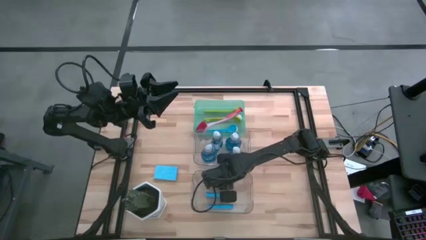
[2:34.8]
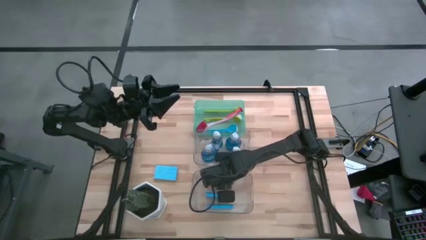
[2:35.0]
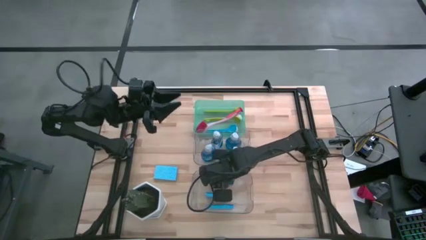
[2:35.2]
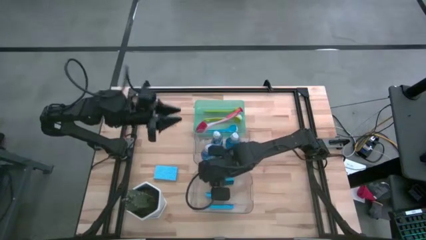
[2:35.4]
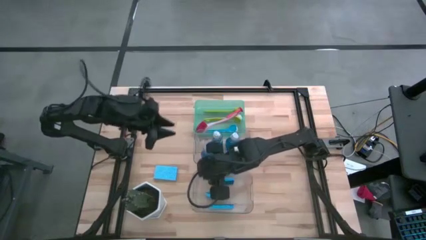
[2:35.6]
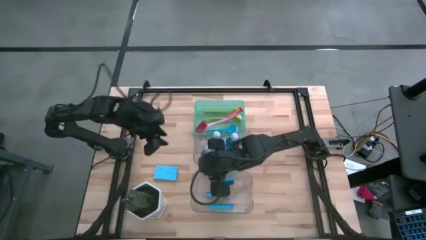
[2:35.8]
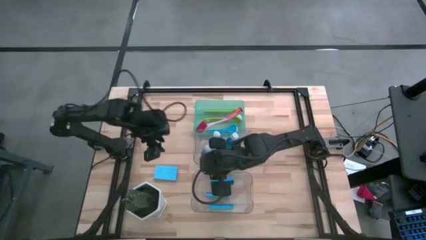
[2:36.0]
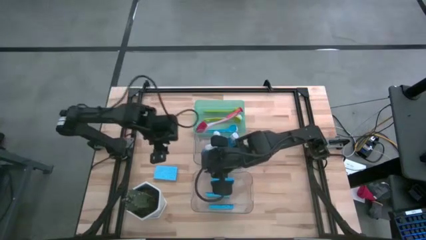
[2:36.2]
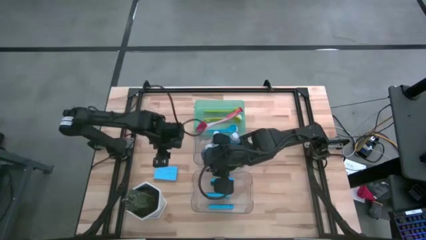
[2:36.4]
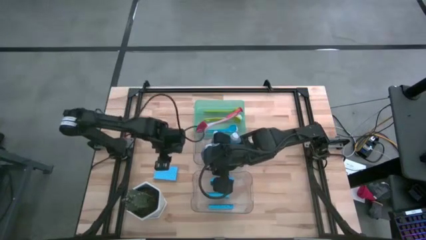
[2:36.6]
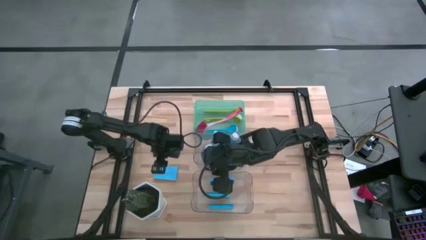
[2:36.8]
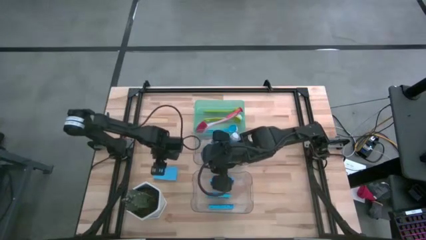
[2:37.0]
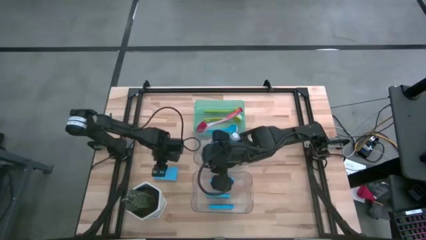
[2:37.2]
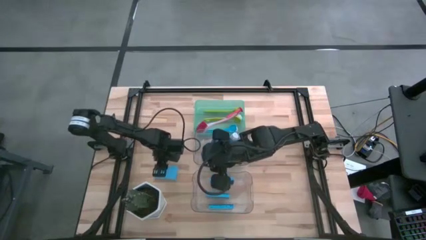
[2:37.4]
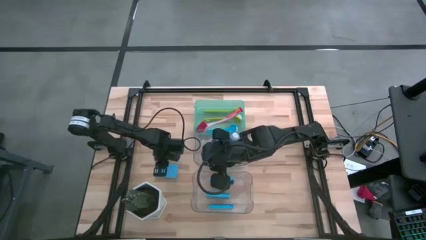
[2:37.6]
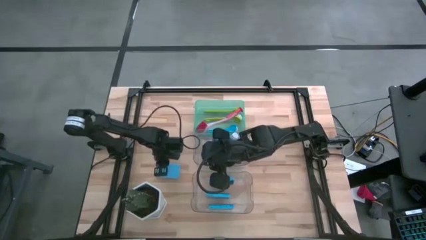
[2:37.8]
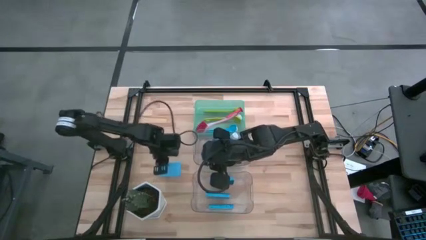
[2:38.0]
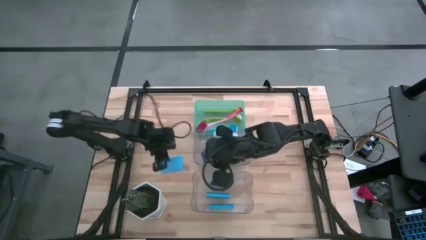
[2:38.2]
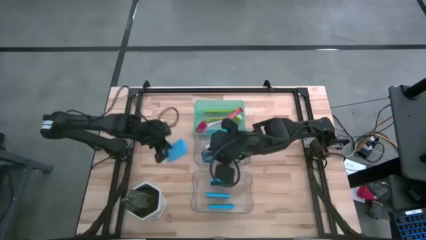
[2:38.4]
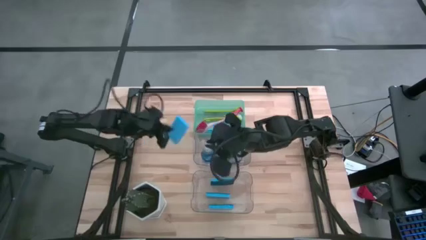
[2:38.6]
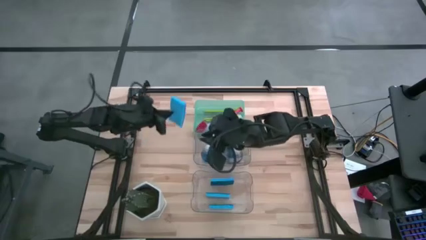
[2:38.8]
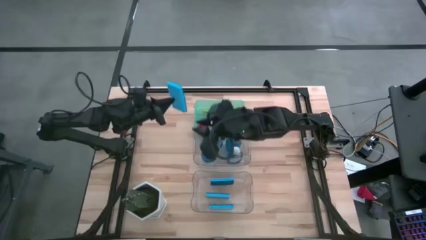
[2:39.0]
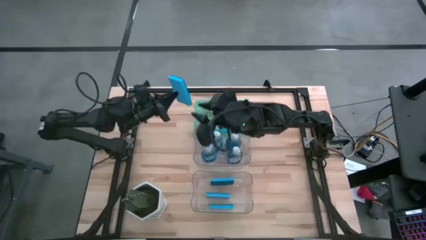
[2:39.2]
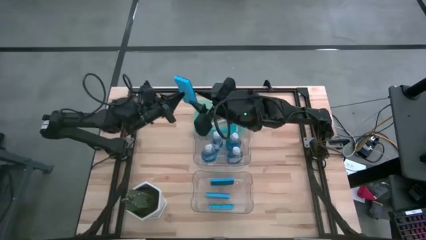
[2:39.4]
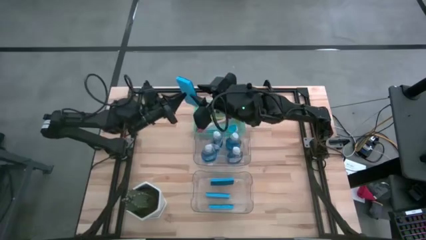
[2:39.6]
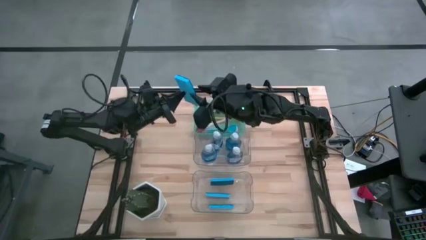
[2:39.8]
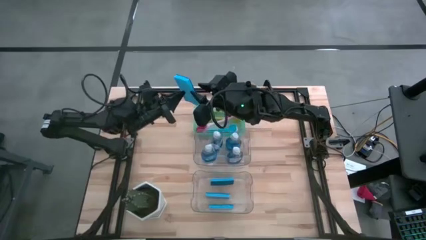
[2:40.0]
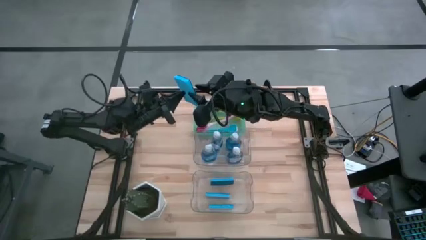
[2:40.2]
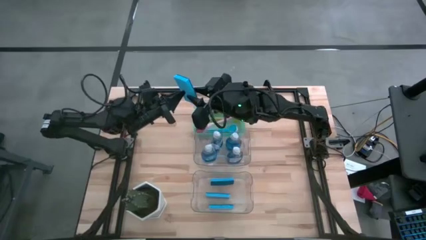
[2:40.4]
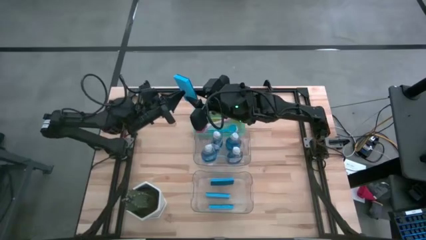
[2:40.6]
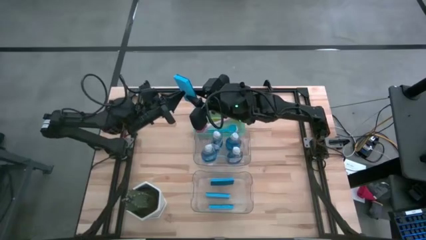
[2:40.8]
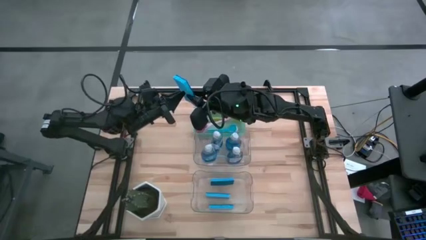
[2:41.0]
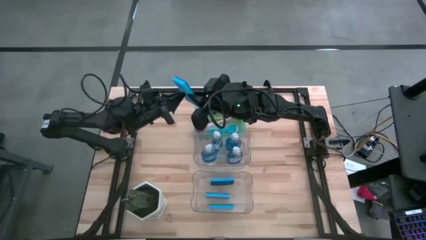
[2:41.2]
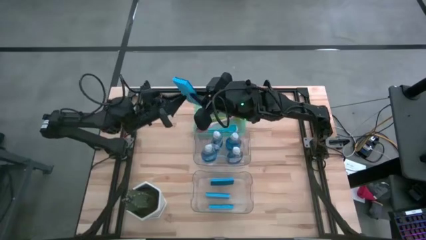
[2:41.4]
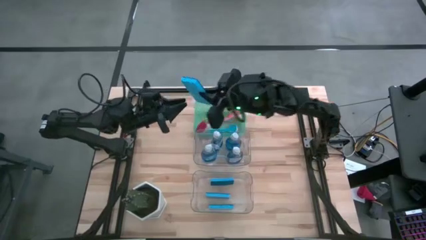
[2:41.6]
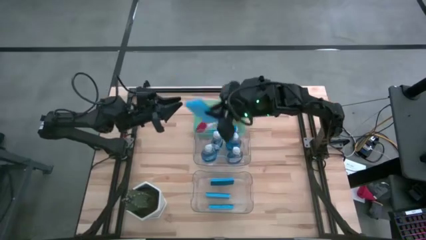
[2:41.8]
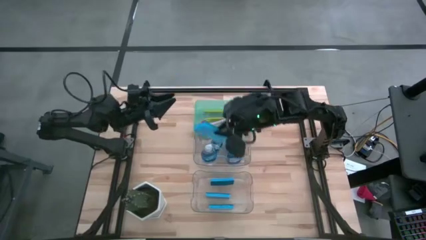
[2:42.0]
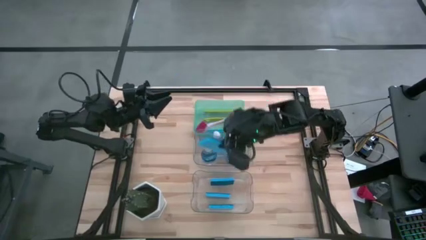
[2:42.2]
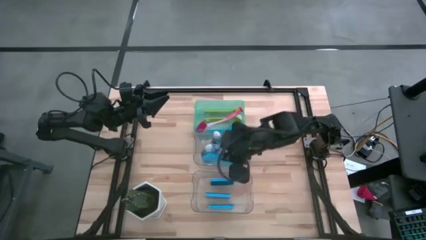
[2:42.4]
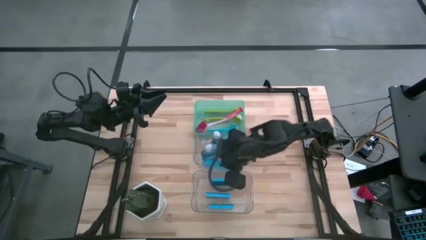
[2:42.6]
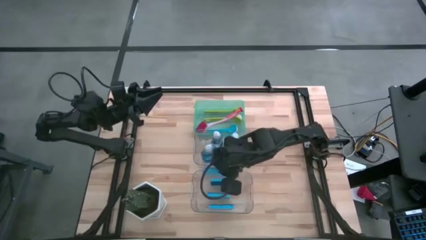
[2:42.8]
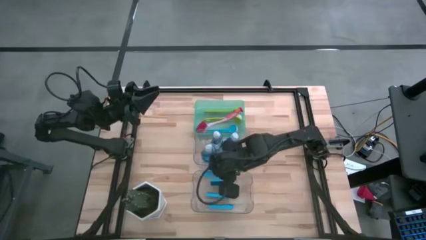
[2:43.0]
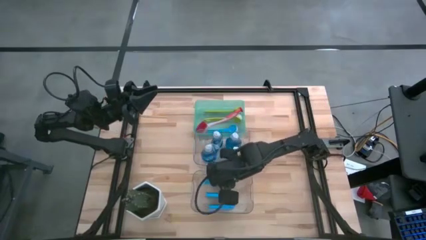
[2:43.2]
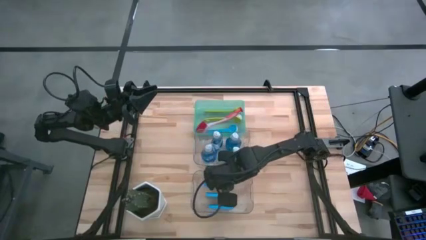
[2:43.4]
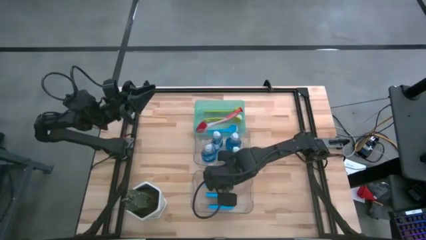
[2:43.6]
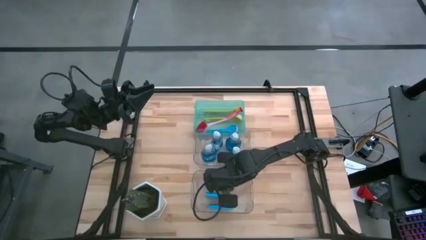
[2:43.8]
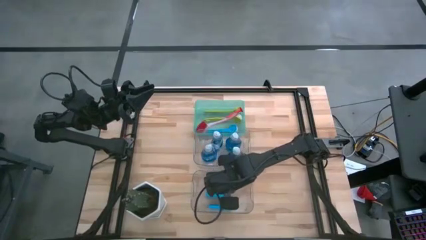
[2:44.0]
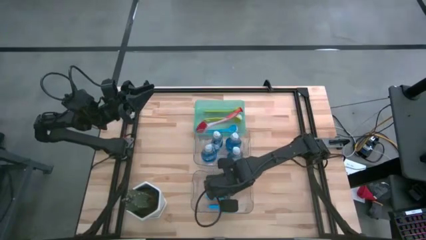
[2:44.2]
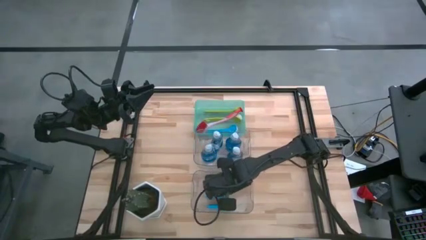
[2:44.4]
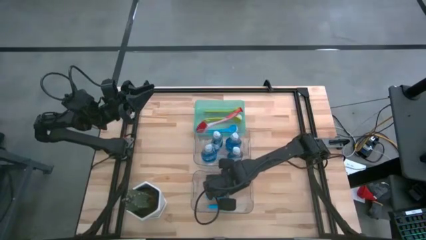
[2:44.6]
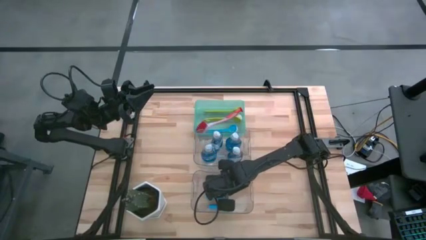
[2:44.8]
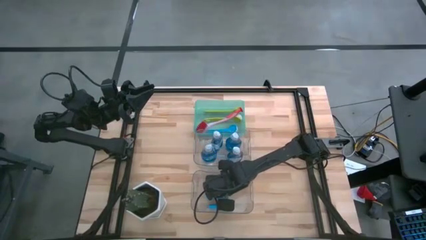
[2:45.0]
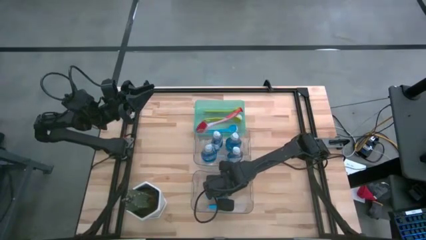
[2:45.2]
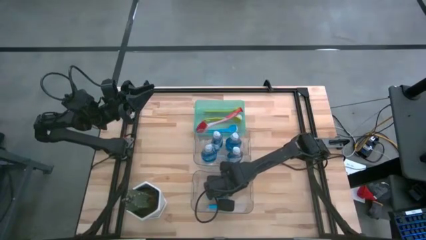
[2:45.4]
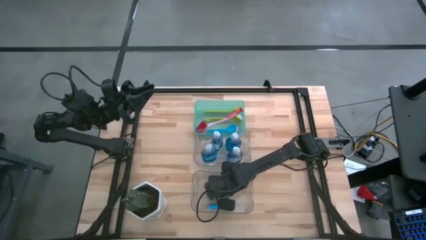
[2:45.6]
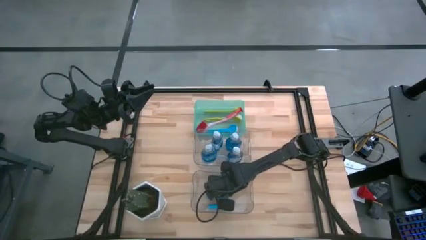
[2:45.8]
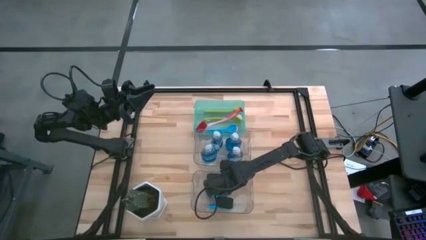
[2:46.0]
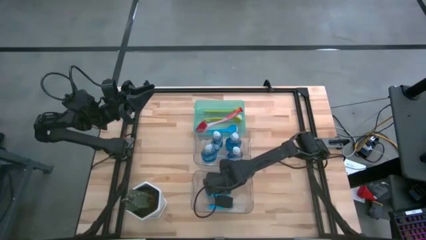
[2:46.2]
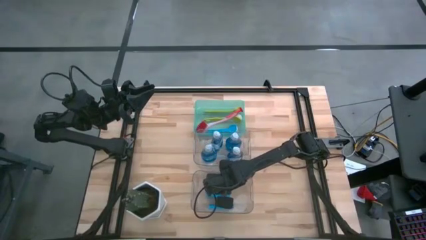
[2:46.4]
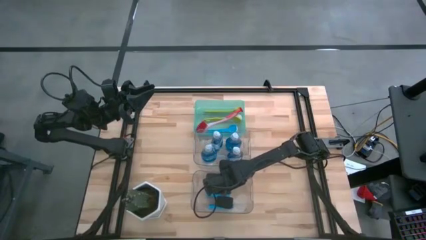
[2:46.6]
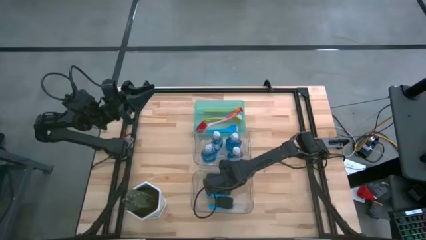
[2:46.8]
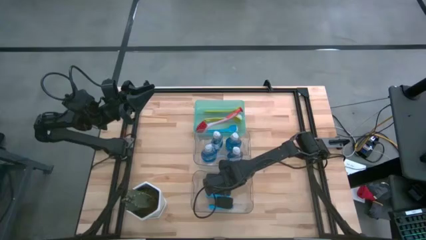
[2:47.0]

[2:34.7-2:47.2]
Task: Pick & Place Kitchen Sink Supplies
Put the blue sponge into the bottom transparent bin

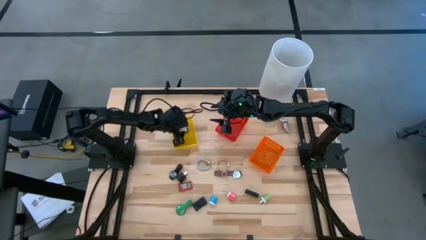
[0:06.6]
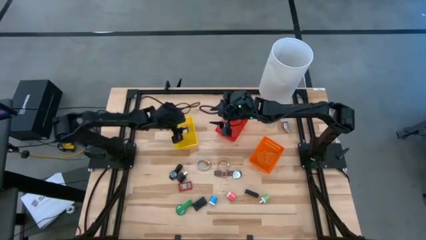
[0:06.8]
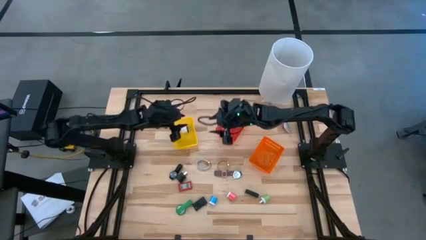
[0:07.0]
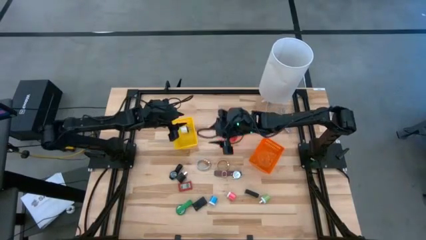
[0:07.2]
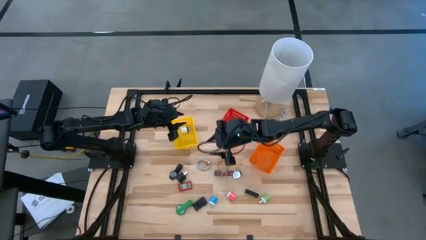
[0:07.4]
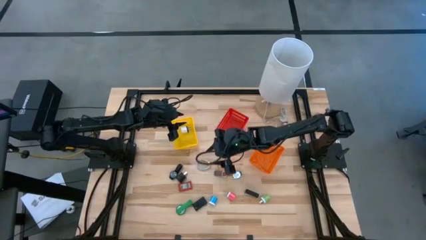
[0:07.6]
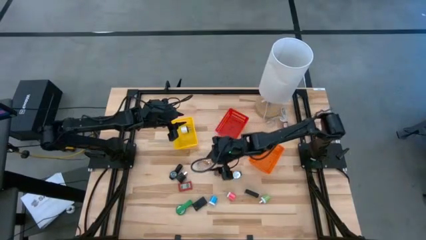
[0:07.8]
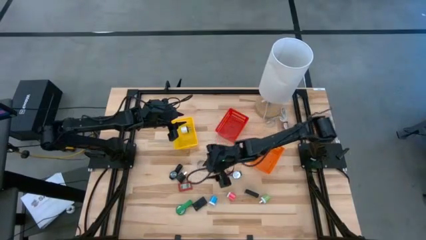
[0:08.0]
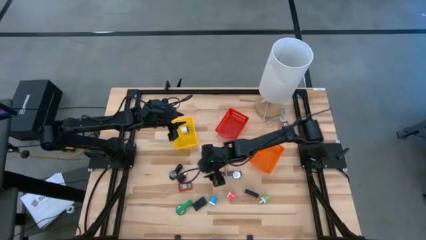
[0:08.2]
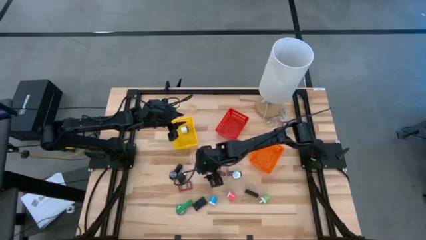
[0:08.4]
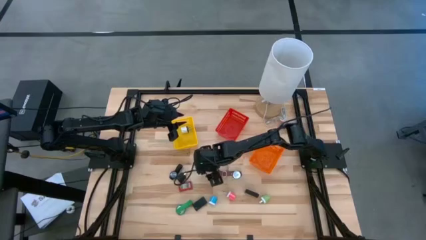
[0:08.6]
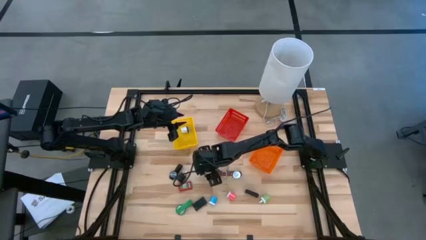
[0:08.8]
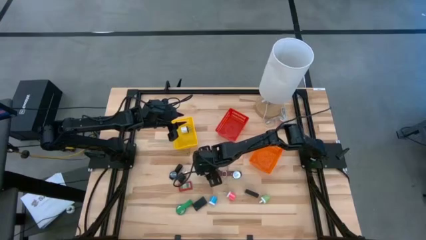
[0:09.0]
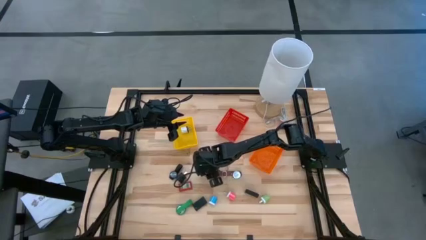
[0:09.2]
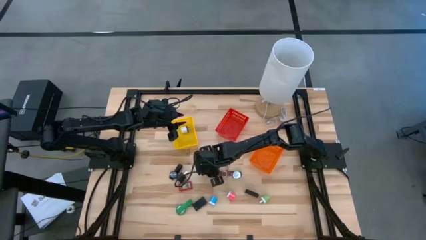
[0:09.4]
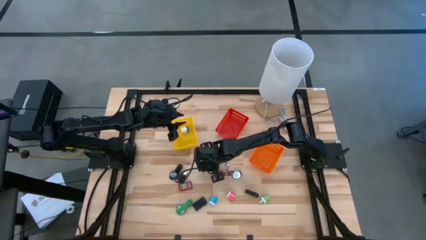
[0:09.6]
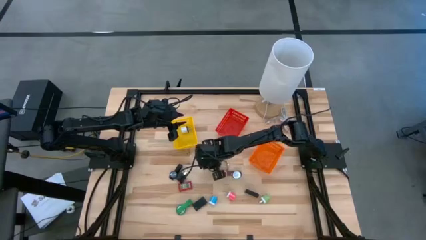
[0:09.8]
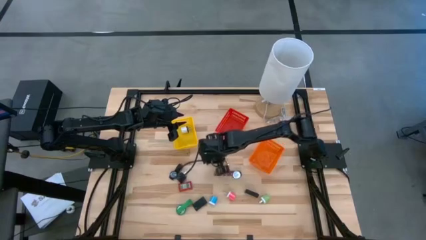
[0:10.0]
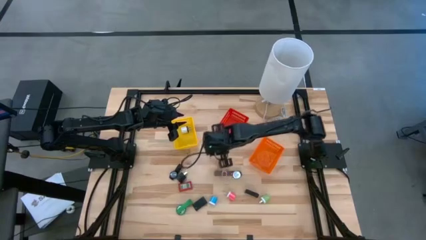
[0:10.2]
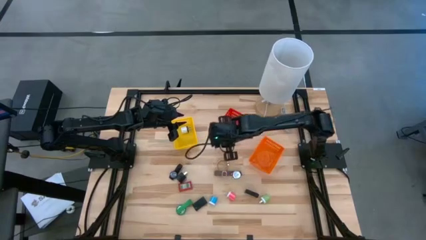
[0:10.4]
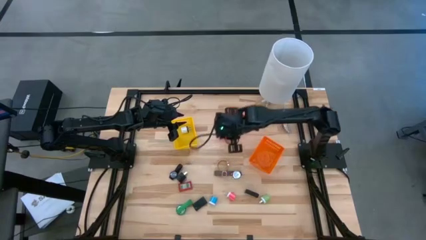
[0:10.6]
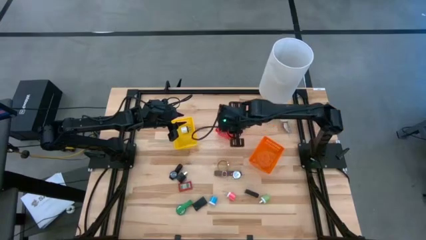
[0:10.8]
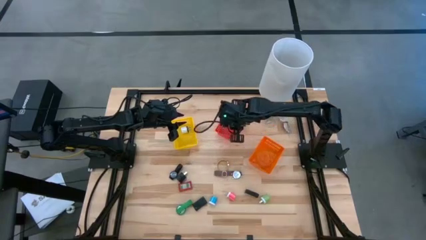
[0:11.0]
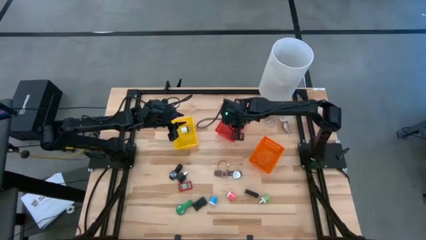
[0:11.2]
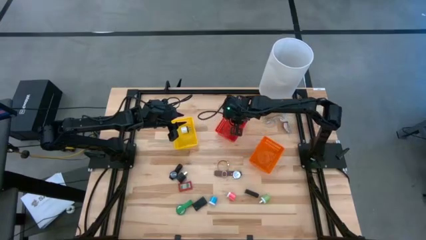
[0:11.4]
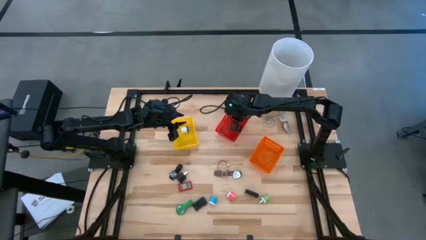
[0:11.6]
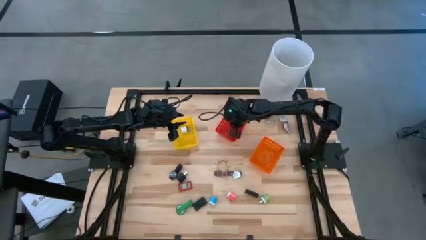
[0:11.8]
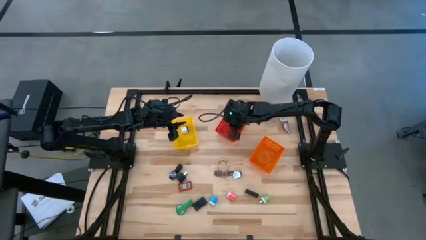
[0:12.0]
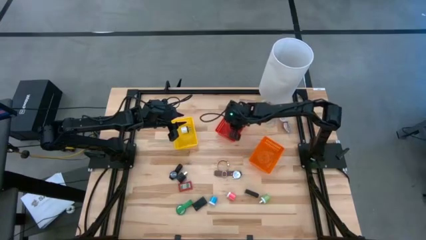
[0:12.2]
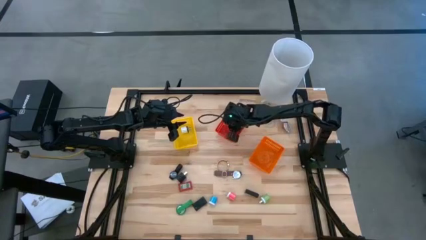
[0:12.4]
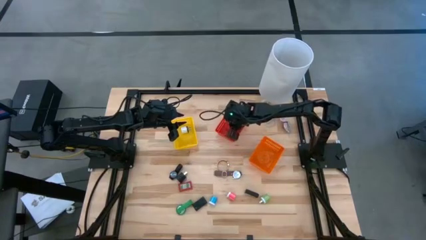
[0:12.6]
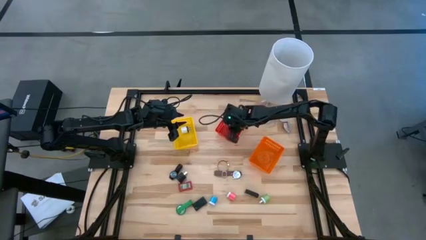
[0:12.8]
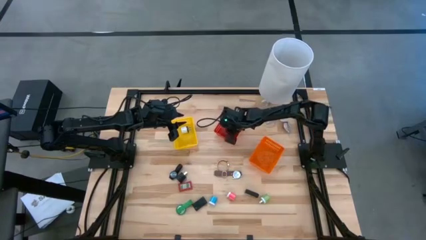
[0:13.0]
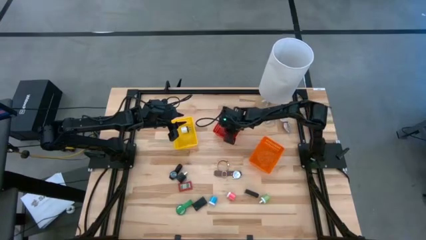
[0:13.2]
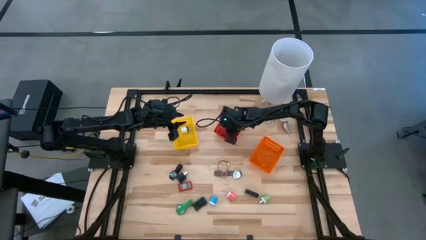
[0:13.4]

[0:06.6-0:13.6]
Task: Pick & Place Office items
Put the white watch into the red basket
